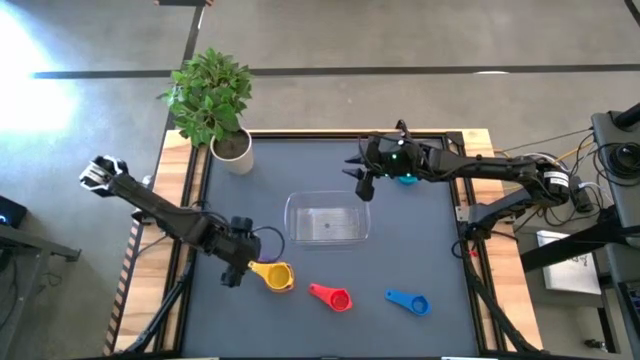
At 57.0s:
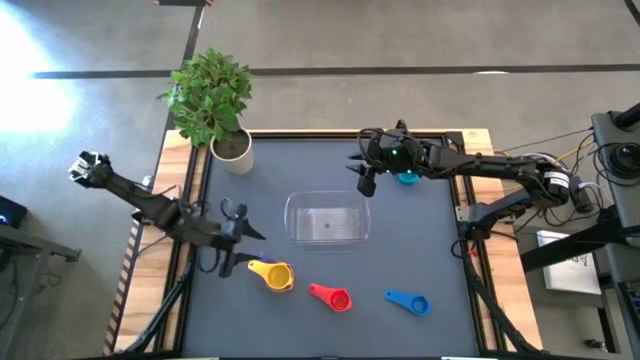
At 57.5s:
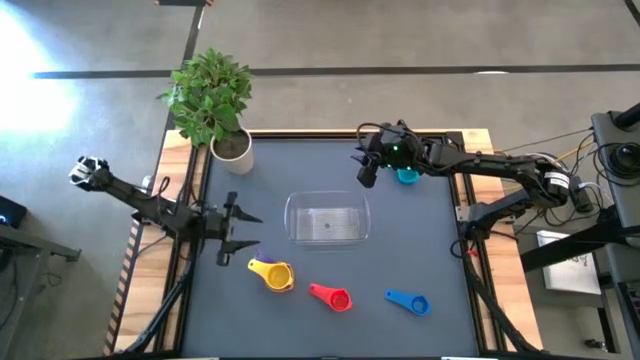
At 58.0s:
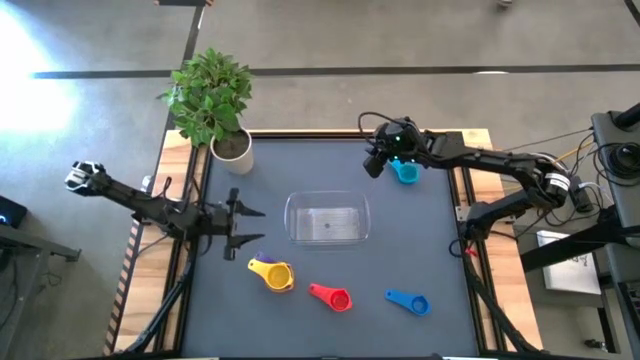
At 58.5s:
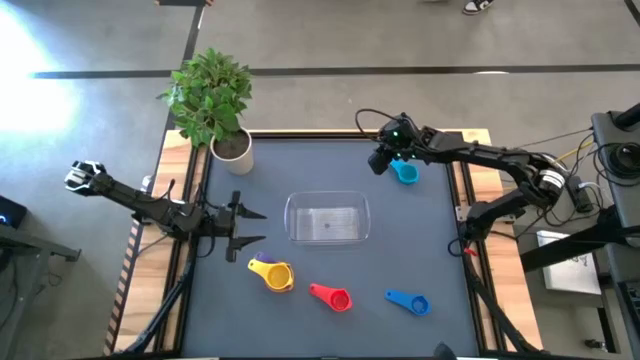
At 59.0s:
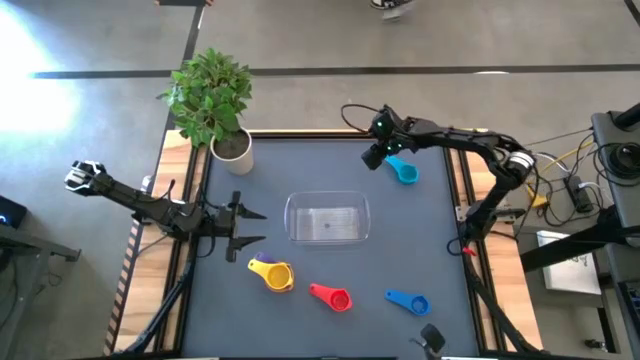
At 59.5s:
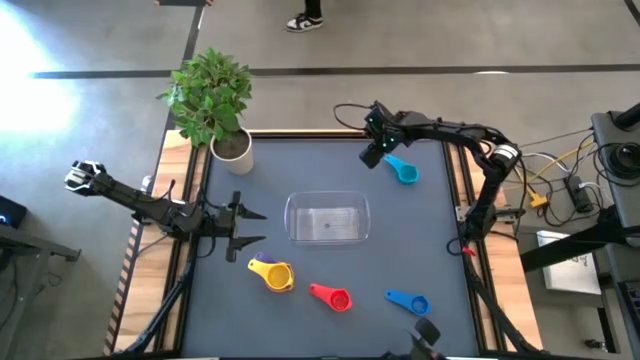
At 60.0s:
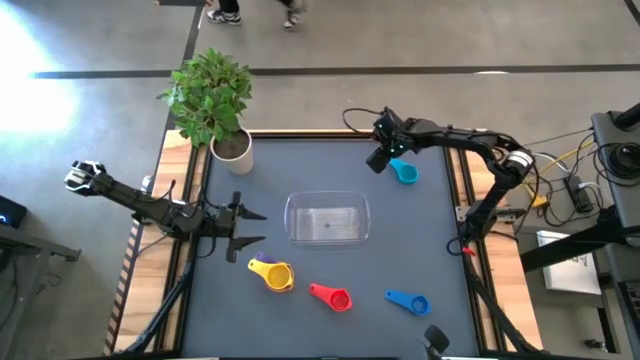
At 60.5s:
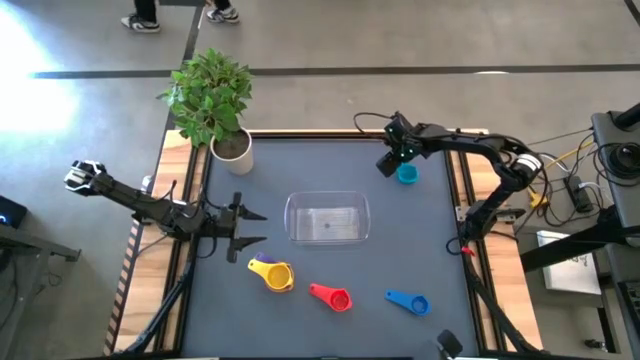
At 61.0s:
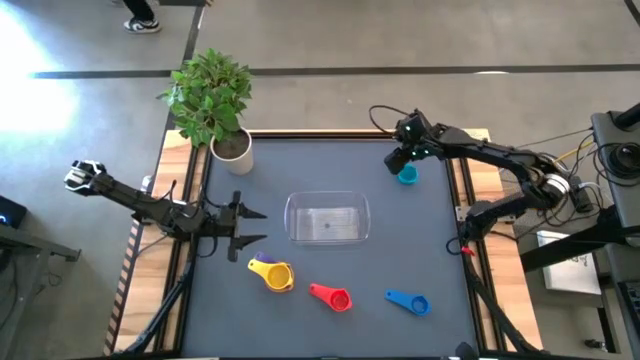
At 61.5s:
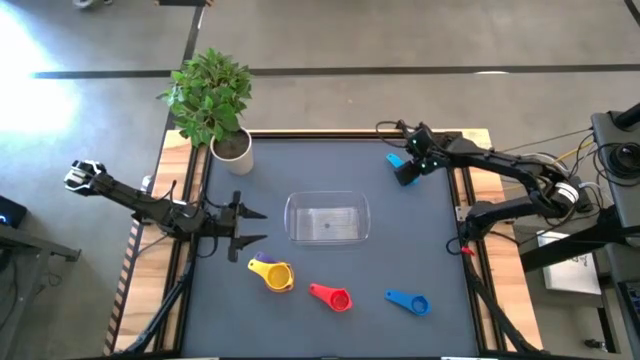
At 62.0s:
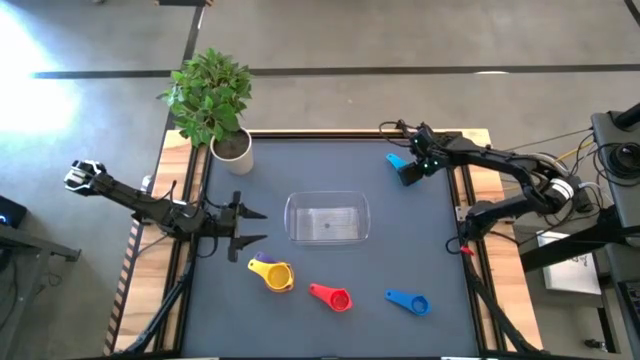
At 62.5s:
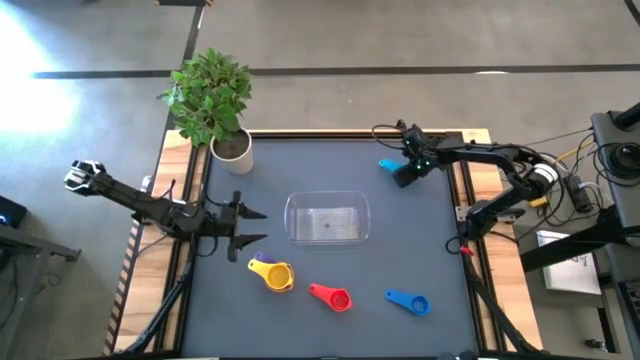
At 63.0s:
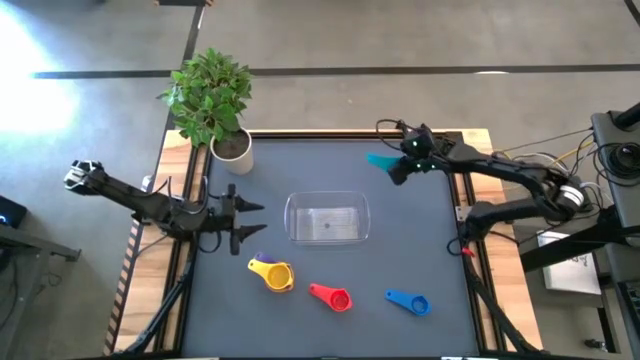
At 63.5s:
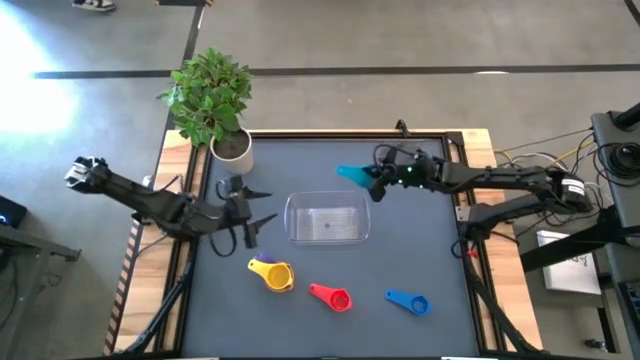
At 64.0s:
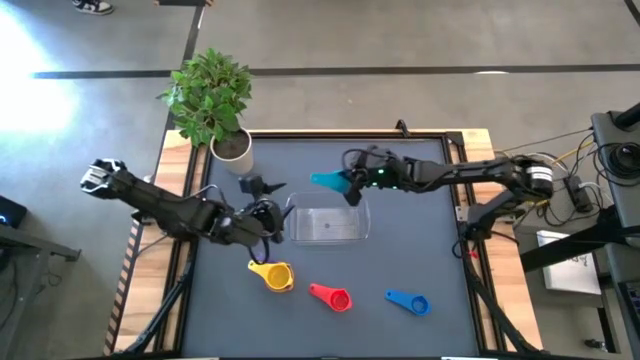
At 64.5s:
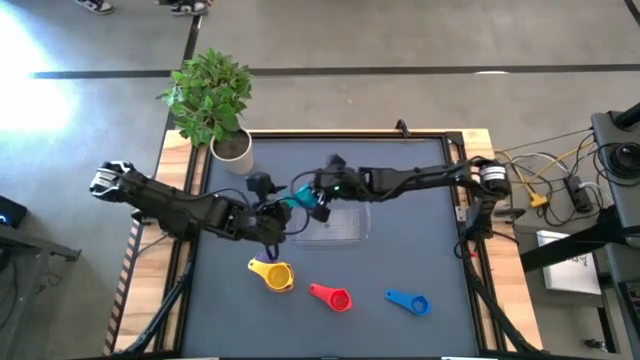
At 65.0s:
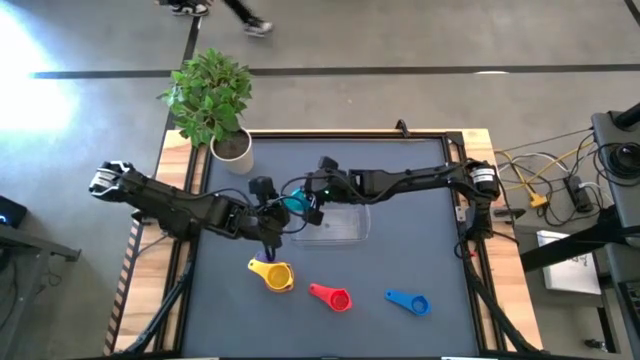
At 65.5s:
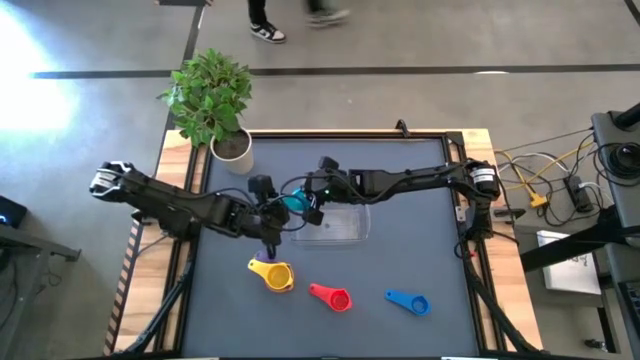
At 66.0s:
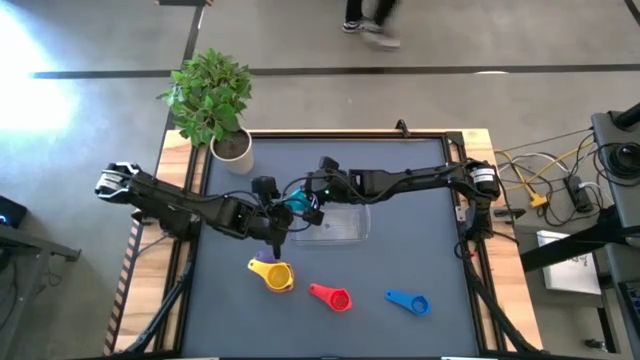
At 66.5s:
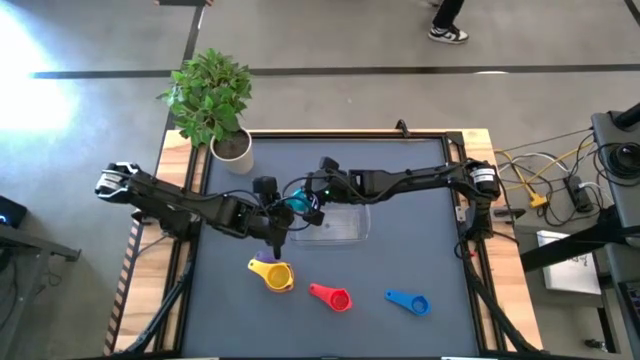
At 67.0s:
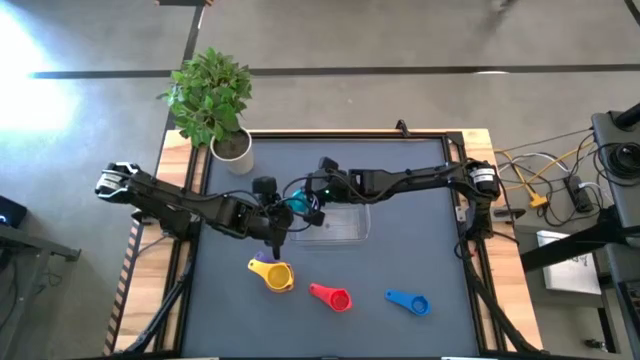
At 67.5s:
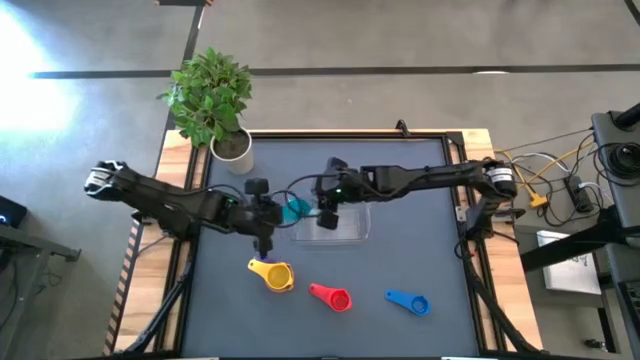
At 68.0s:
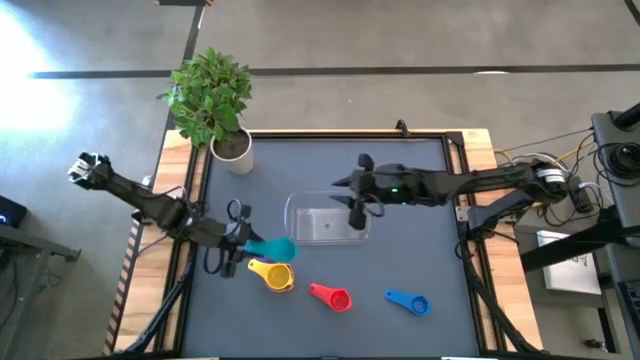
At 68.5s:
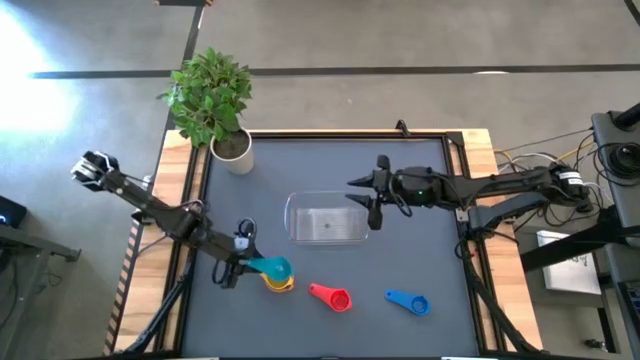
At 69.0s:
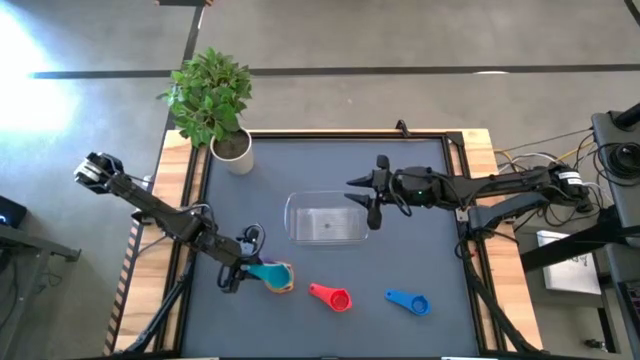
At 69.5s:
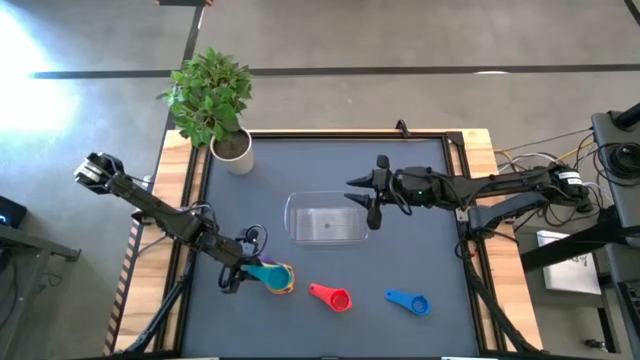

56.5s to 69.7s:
Task: Nest measuring cups in basket
Stack the light blue measuring cup on top of the yellow measuring cup

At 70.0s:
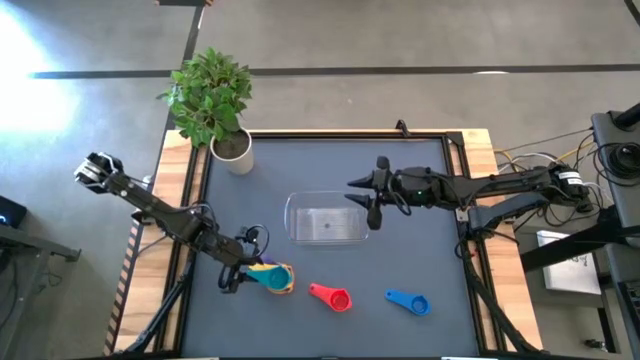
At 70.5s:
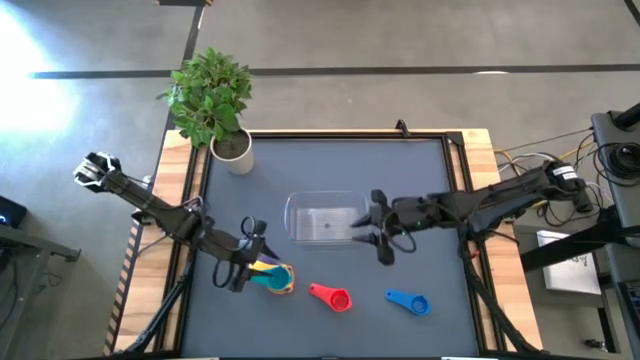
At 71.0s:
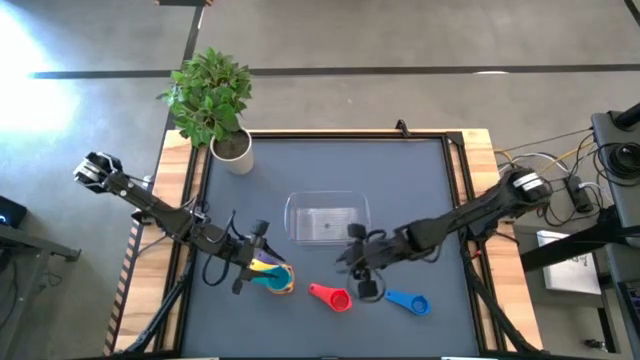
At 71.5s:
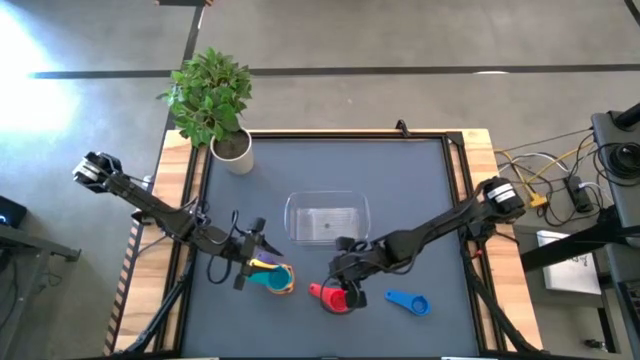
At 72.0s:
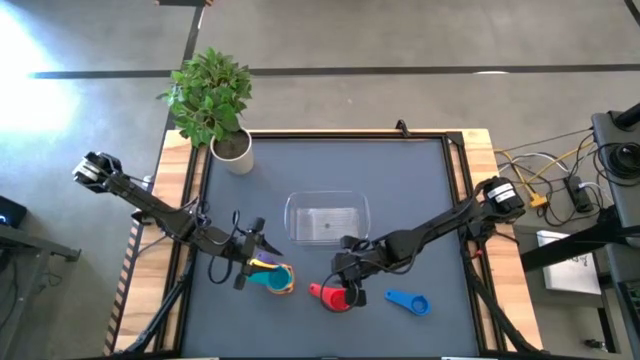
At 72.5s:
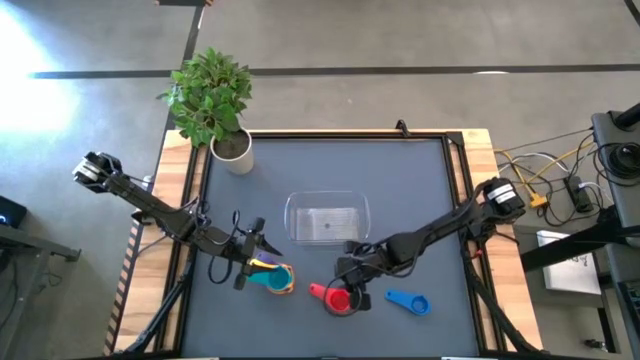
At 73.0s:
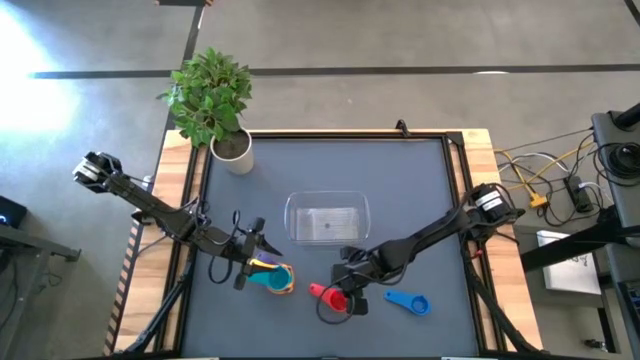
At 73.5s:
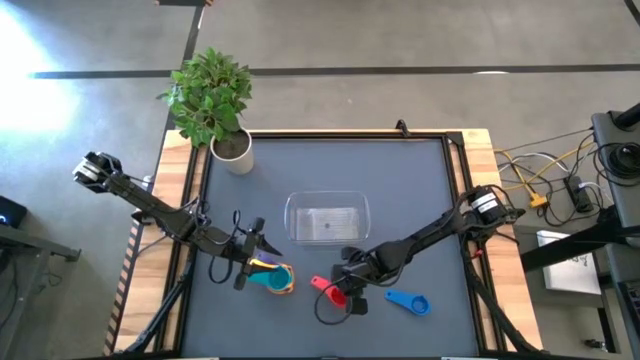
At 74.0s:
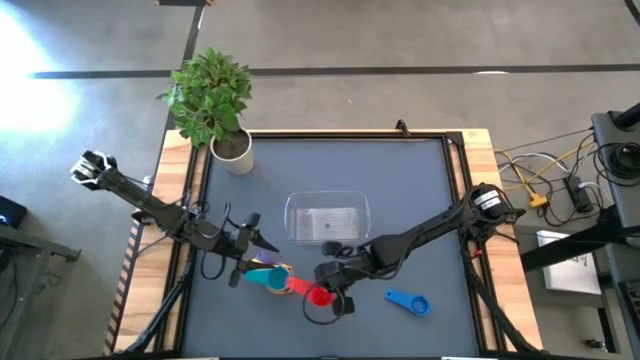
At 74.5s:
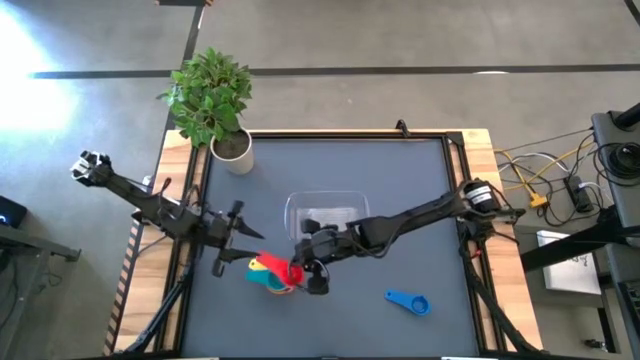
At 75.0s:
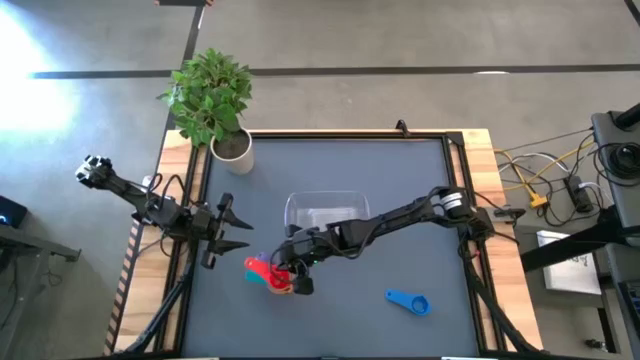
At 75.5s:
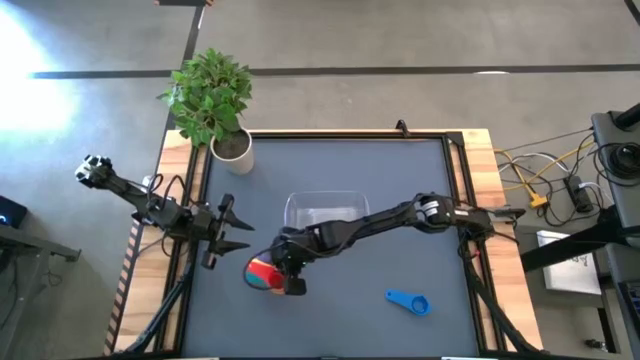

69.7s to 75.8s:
Stack the red measuring cup on top of the light blue measuring cup

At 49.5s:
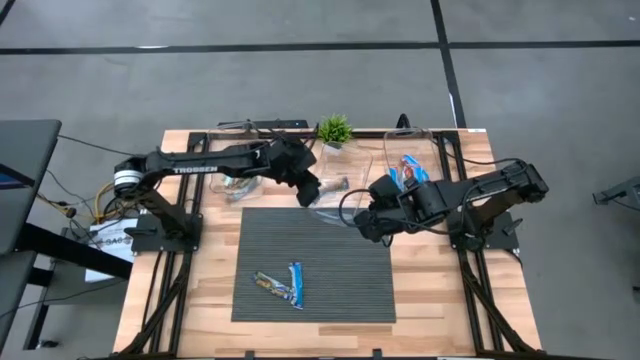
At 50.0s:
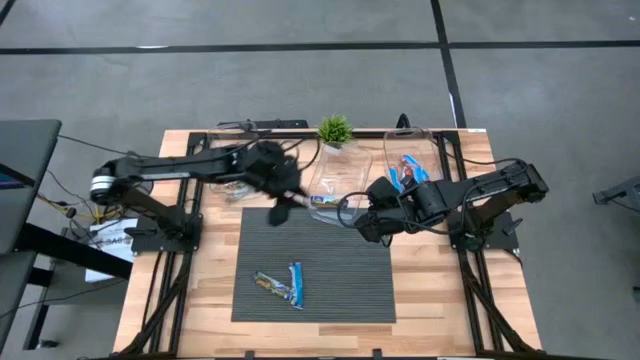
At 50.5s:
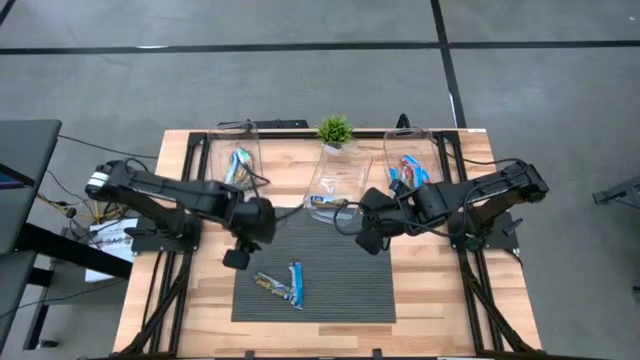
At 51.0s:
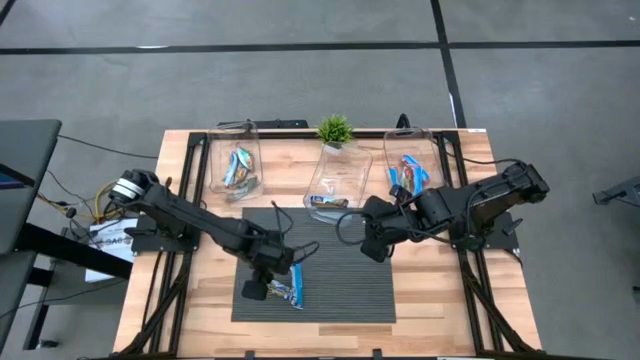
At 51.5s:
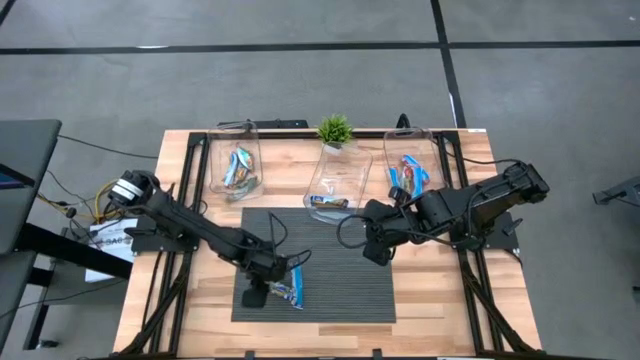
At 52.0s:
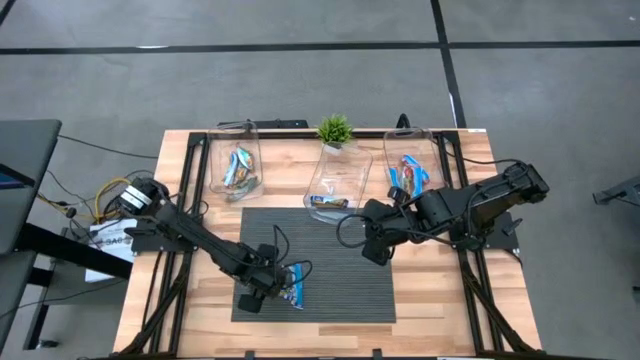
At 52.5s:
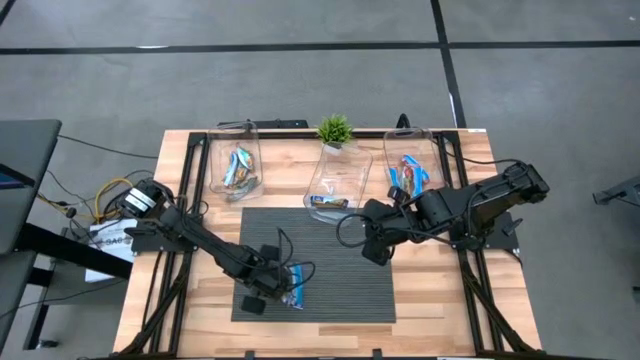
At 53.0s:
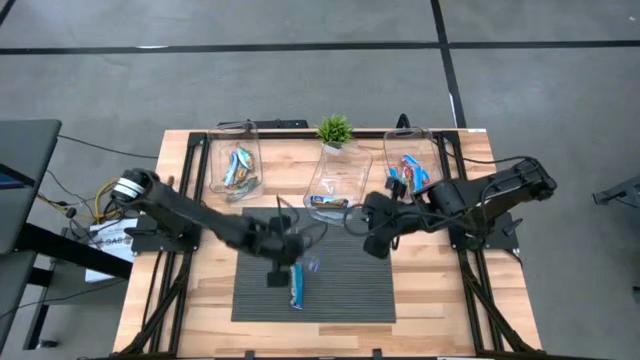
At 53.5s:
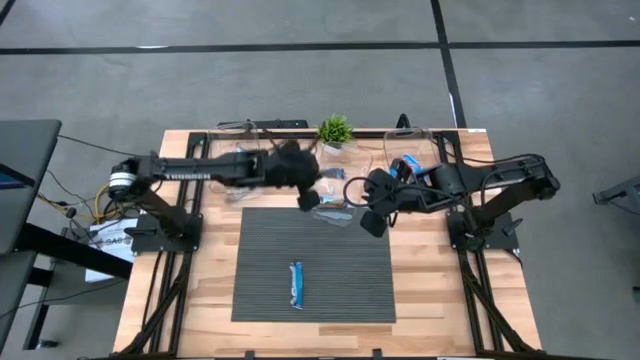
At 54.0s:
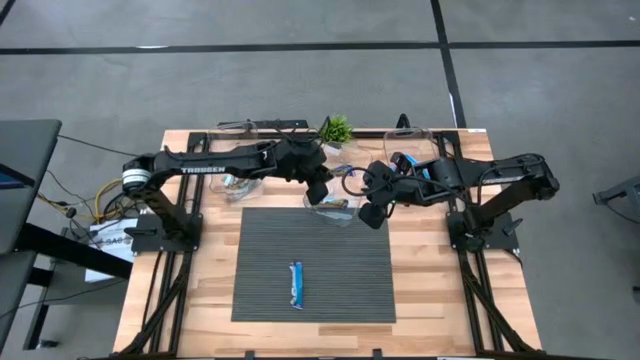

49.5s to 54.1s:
Task: Pick and place Granola Bars by type
Put the purple granola bar into the middle transparent bin
